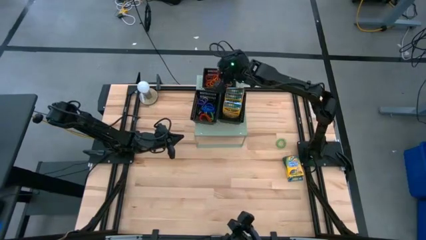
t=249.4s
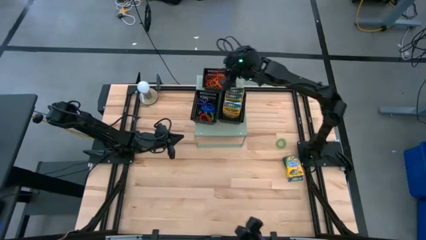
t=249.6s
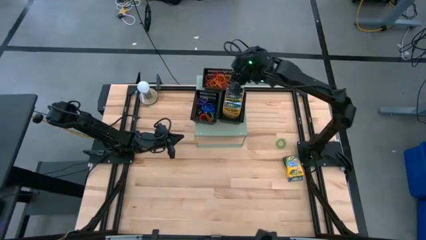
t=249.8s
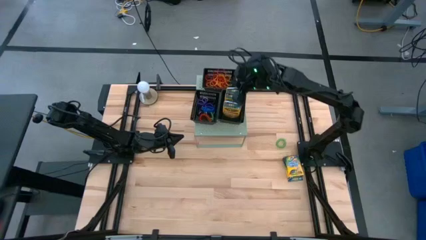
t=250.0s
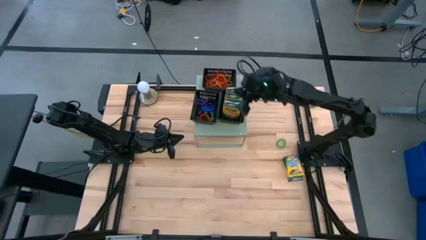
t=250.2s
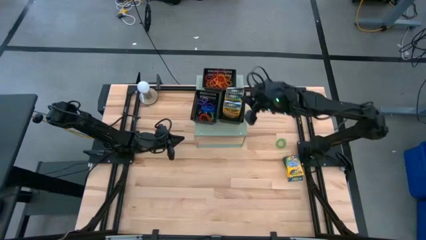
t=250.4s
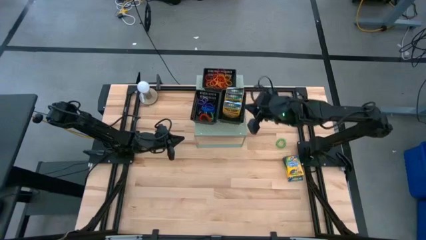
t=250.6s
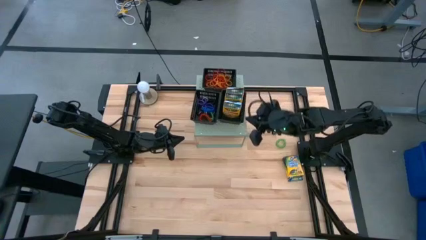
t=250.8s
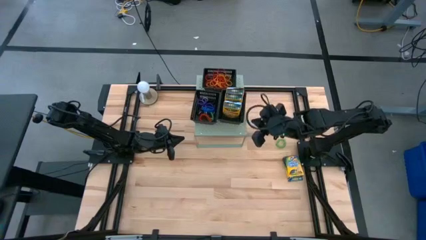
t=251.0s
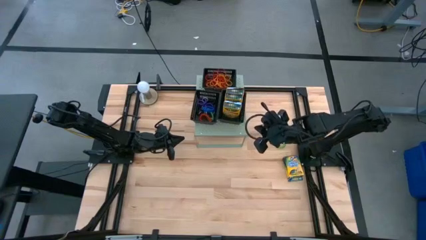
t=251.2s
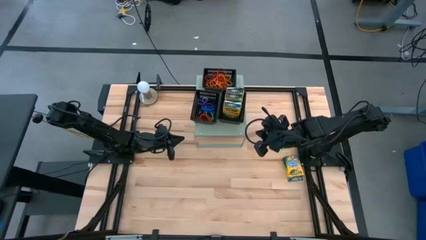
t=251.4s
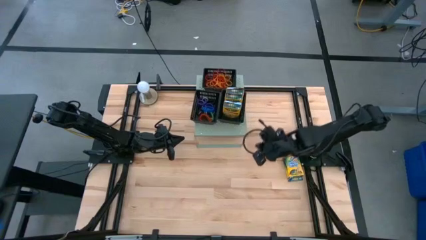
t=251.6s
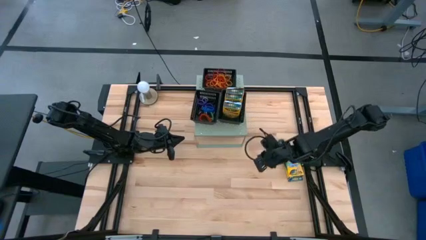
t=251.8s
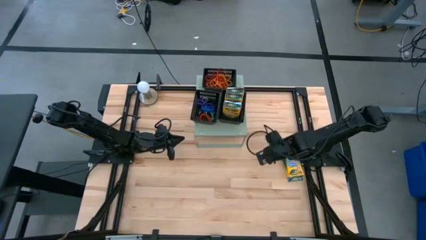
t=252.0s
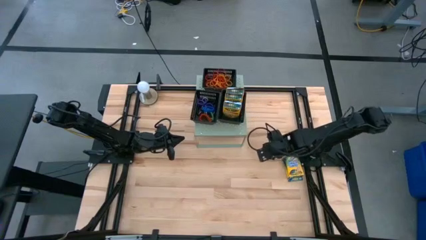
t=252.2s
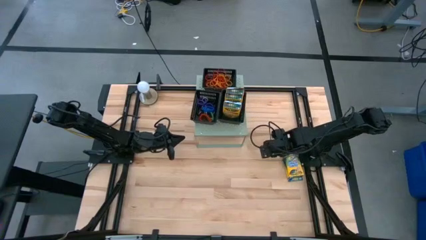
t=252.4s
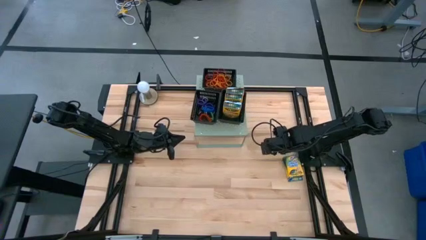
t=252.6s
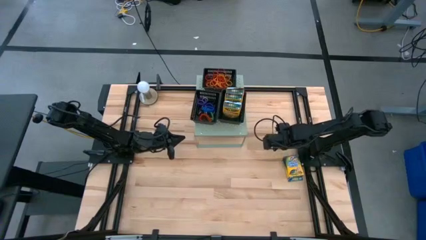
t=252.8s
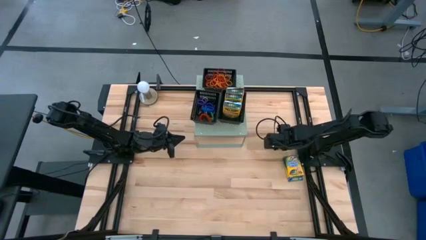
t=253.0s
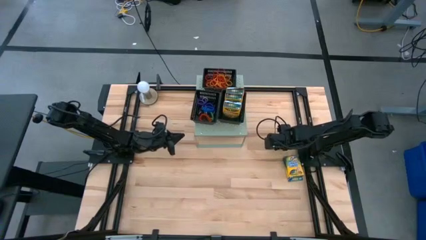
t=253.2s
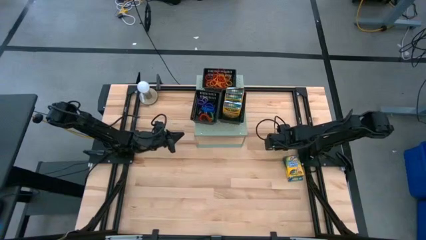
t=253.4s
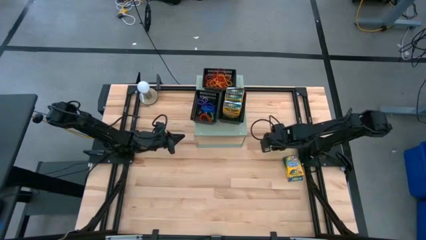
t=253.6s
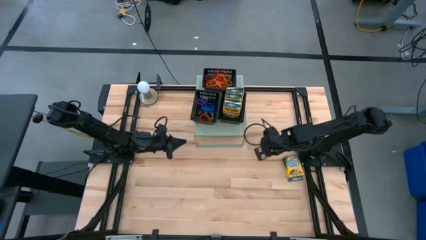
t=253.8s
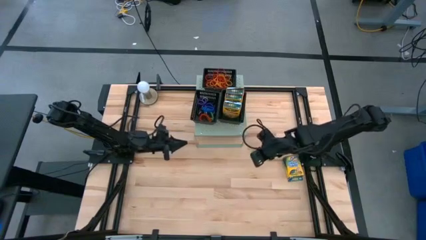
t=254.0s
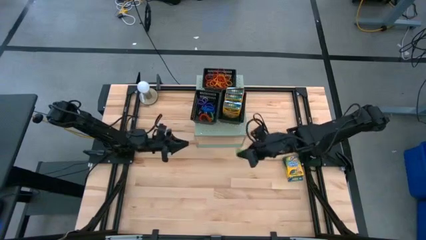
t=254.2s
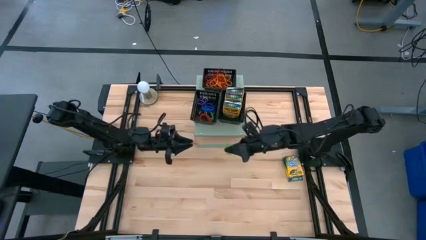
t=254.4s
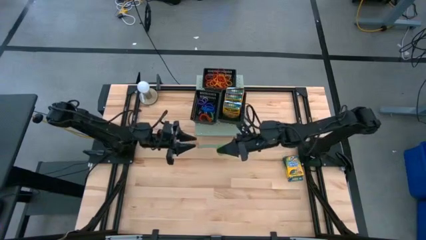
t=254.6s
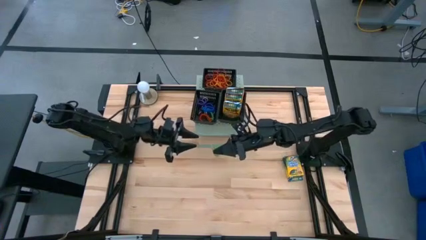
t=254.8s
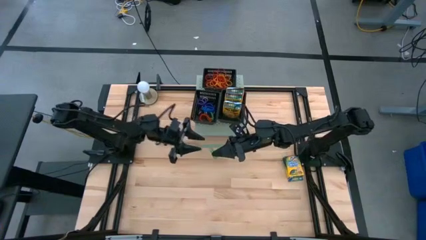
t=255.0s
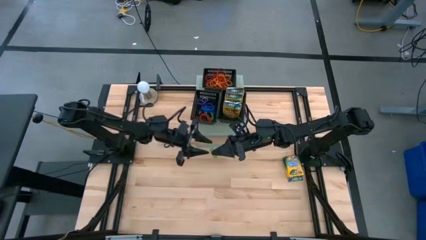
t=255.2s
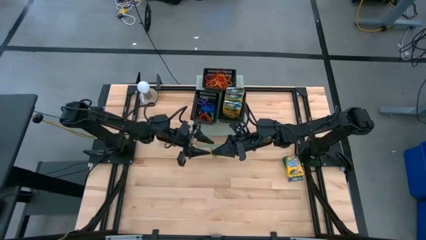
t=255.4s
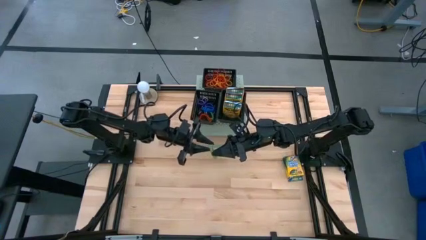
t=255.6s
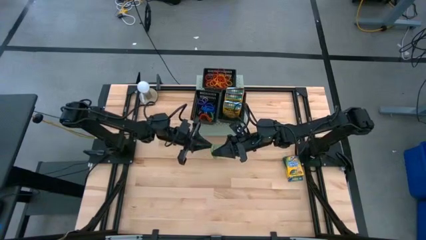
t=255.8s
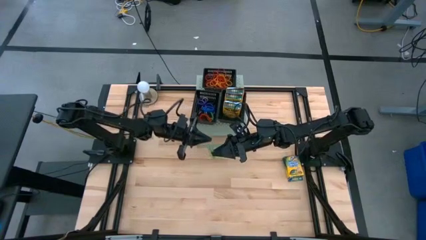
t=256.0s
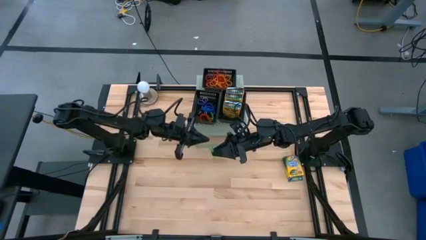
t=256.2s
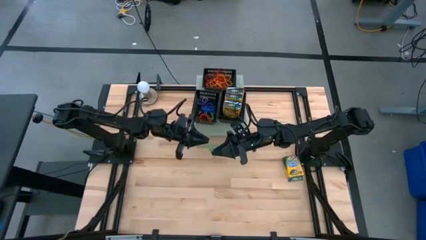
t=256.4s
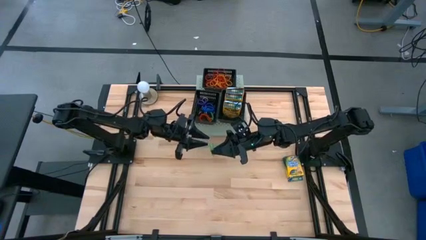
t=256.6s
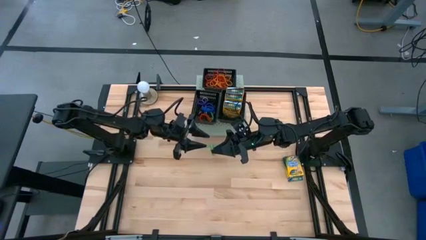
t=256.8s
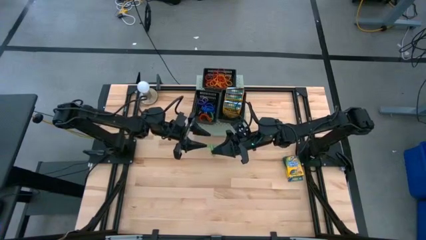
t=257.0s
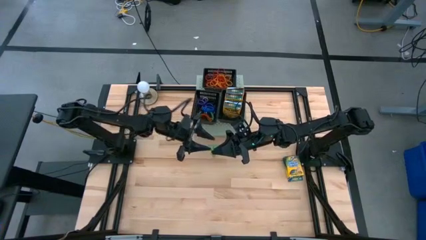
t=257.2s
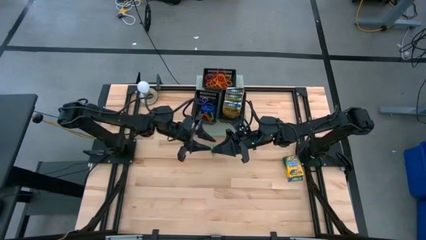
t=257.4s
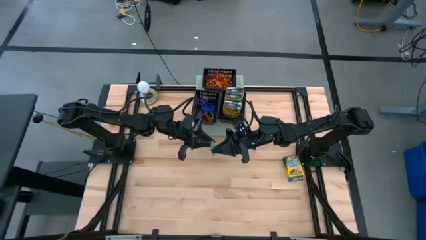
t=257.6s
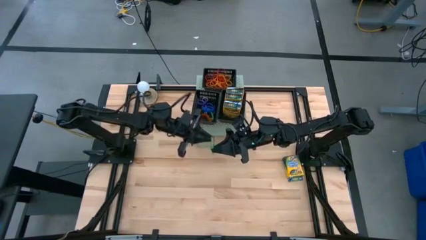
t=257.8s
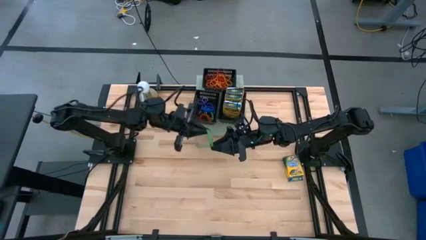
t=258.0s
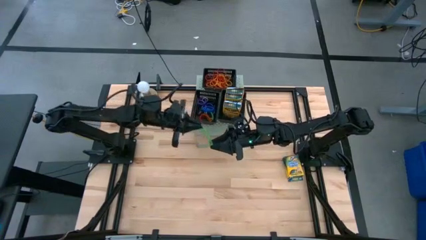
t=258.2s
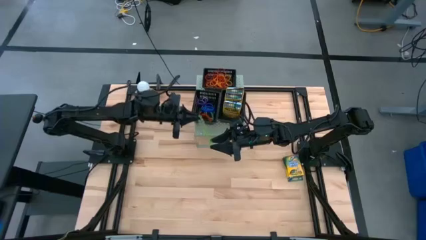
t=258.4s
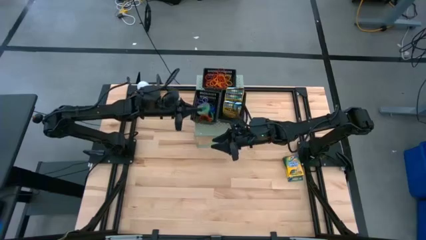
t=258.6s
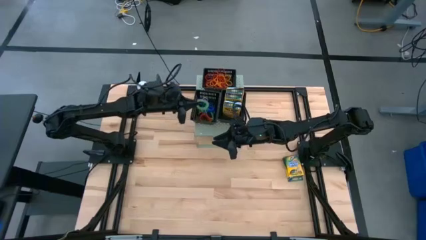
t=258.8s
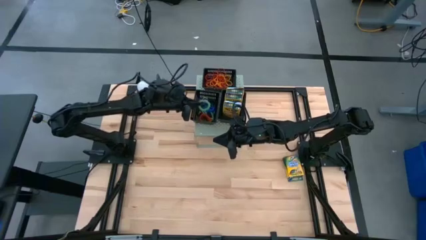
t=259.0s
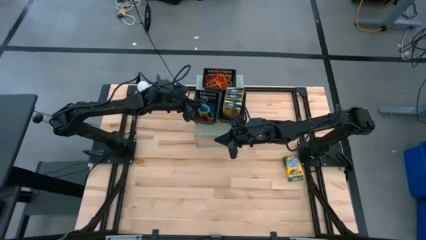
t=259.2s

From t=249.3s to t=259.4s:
Task: Pick & Place Office Desk Supplies
Put the green spiral keychain into the bottom left black bin

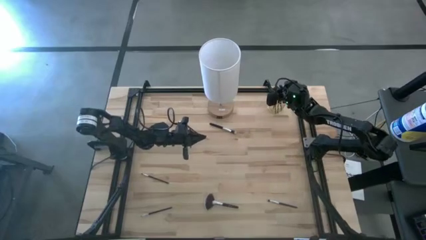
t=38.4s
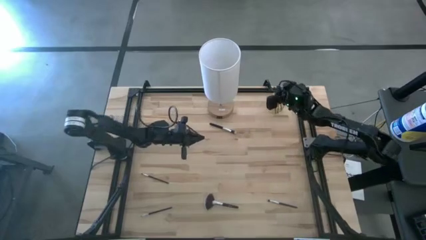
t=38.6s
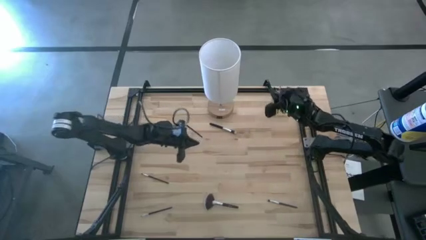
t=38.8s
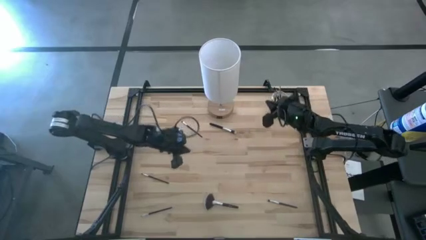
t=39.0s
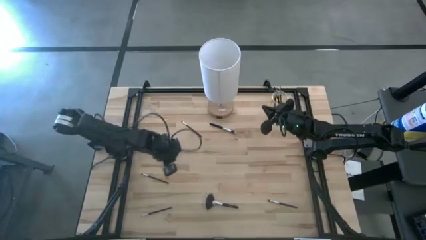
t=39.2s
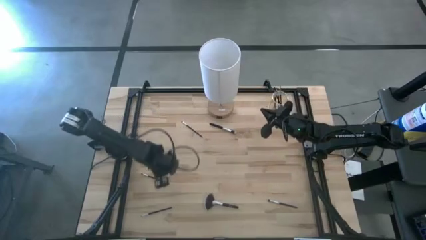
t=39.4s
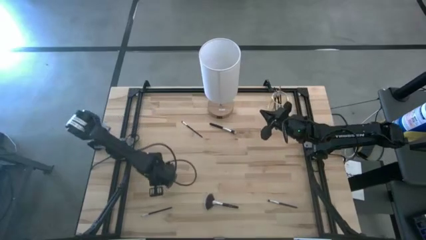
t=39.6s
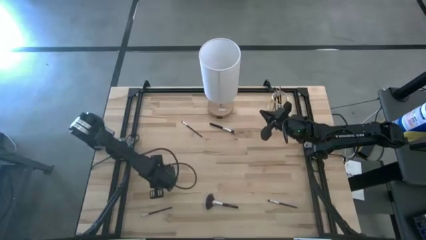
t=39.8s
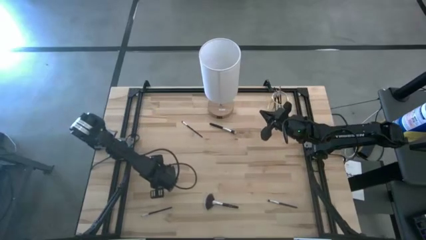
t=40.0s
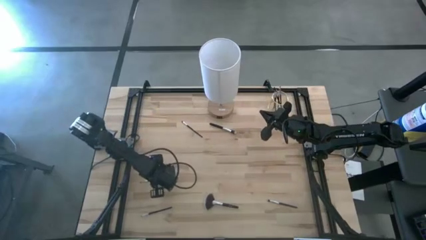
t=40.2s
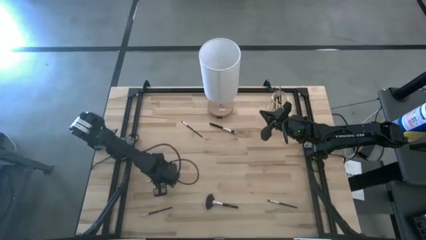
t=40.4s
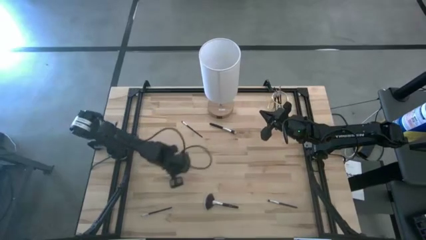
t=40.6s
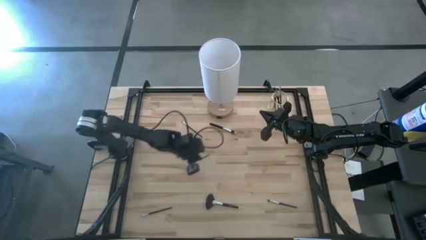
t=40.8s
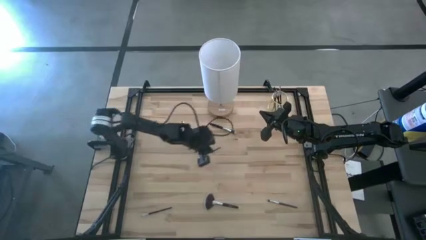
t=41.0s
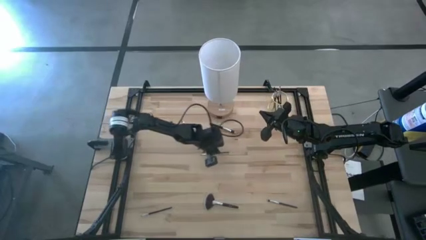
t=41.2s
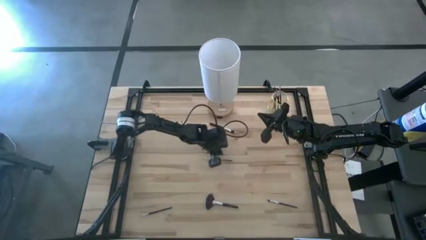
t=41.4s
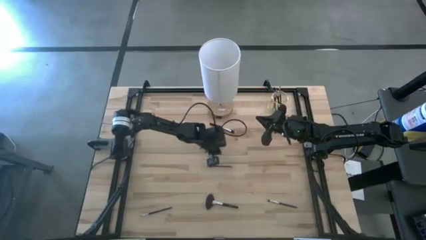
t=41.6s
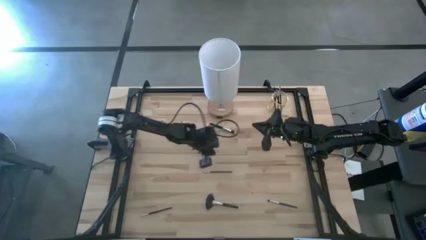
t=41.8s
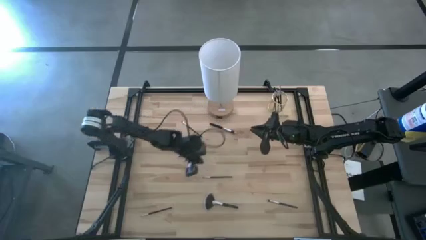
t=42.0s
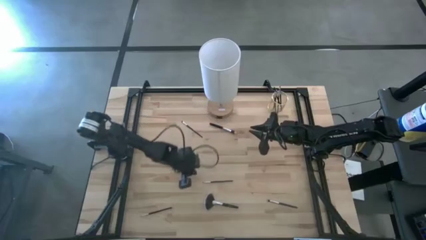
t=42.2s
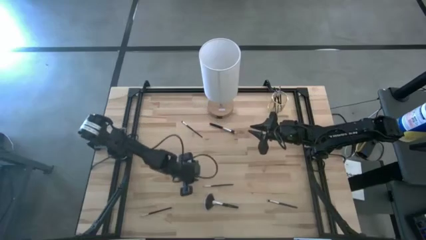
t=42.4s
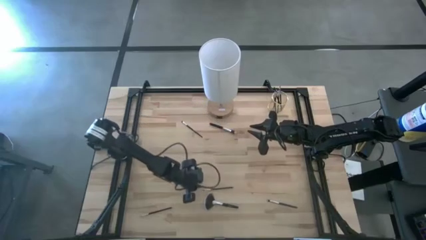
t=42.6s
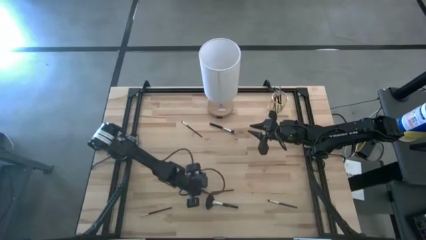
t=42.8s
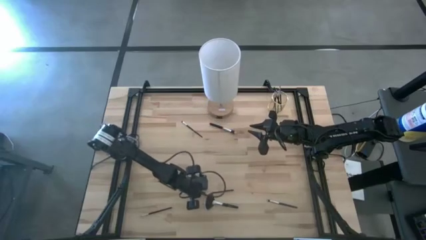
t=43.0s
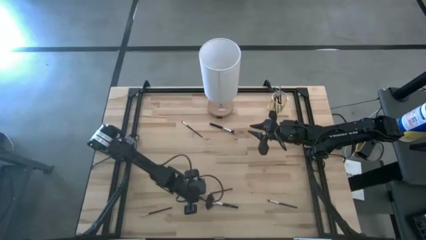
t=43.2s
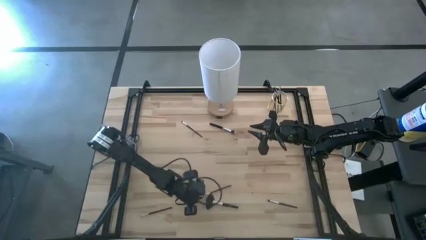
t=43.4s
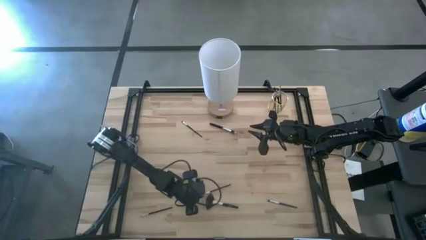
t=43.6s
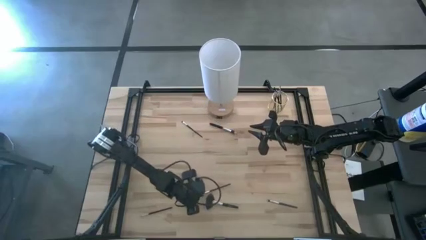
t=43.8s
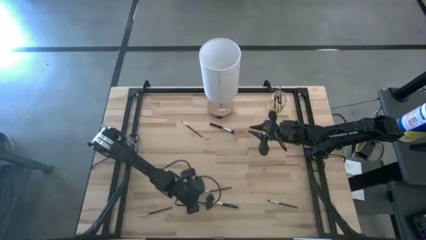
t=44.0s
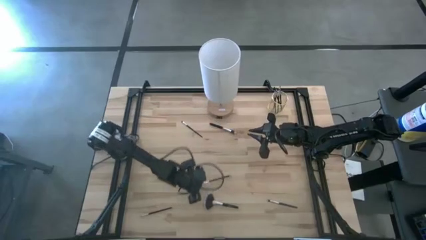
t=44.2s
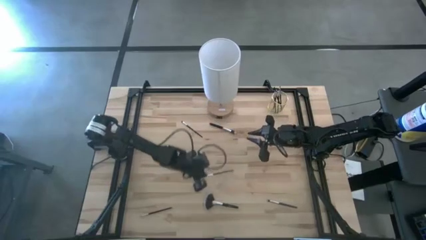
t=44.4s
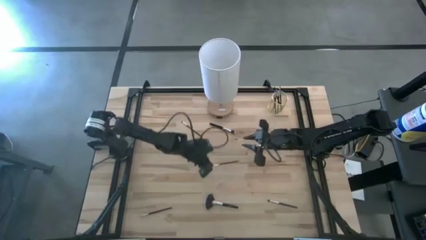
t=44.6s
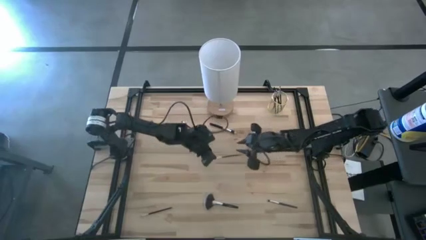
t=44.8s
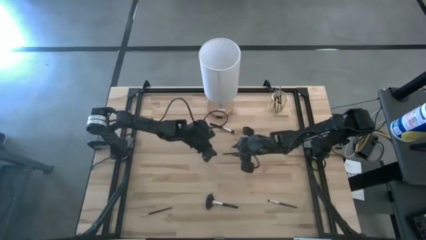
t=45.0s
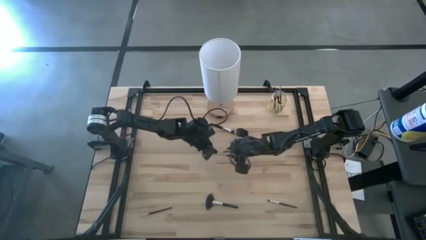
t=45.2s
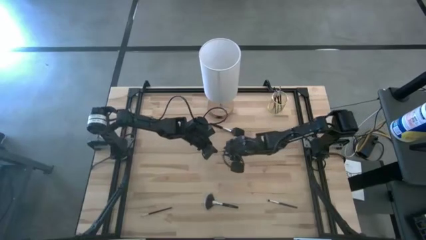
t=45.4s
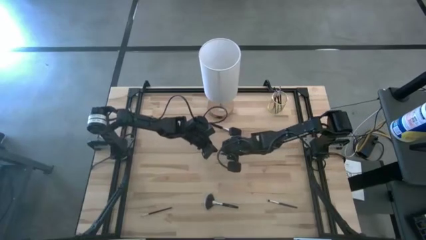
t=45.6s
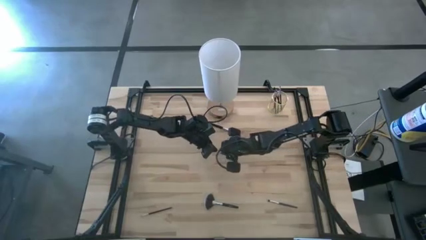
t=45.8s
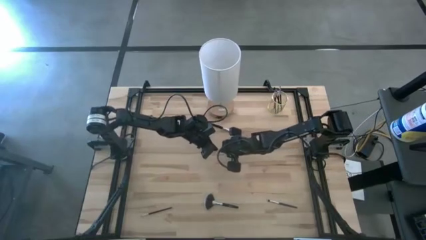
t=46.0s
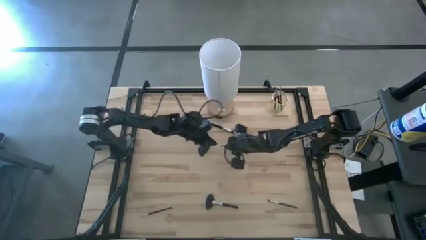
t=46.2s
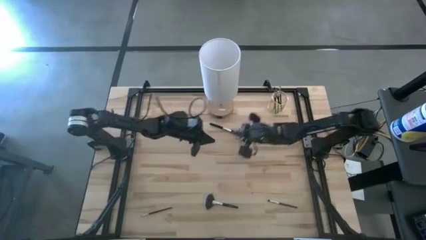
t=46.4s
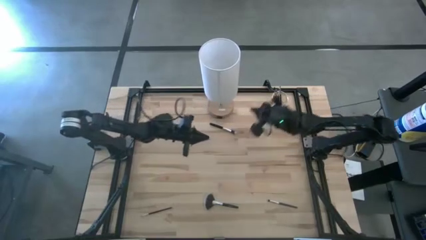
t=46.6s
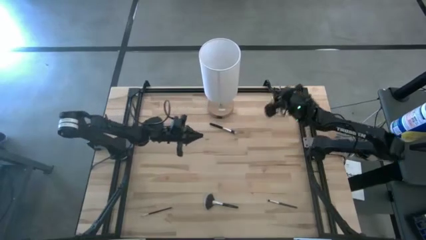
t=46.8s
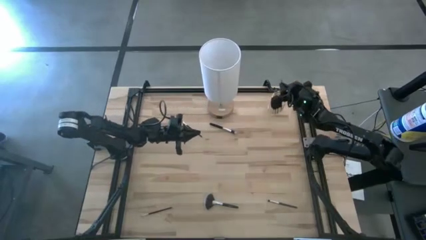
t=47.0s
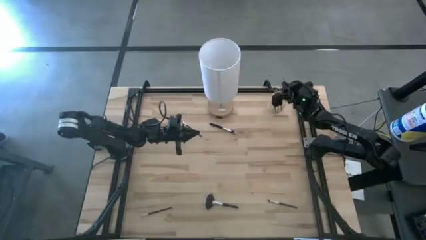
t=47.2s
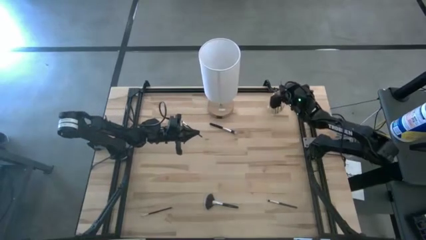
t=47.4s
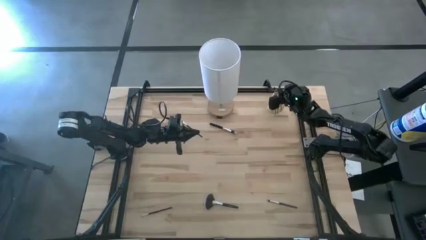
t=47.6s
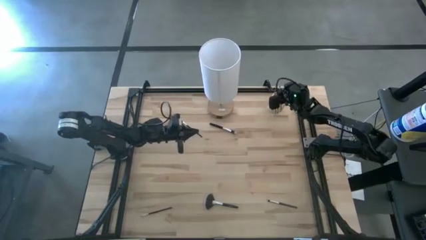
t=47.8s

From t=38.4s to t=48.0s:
Task: Pick & Place Makeup Brushes
Put the eyeshadow brush into the makeup brush holder
